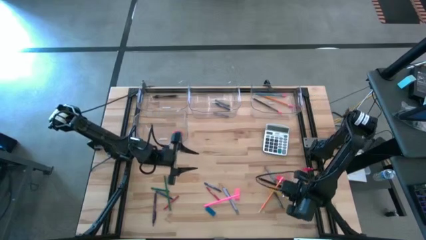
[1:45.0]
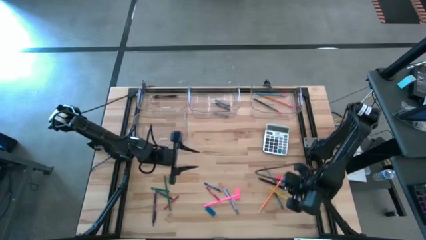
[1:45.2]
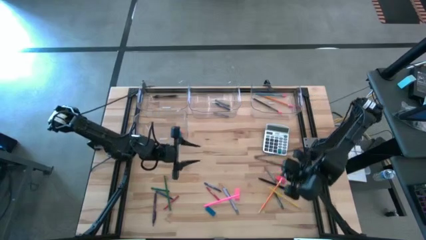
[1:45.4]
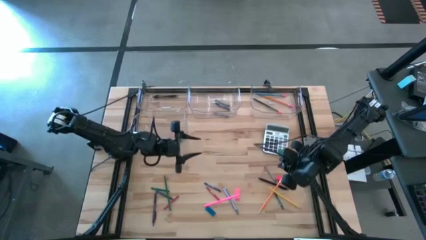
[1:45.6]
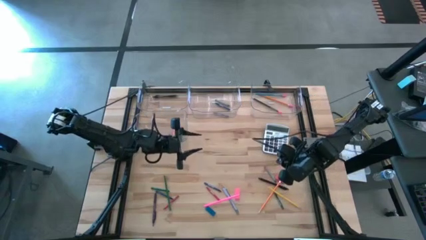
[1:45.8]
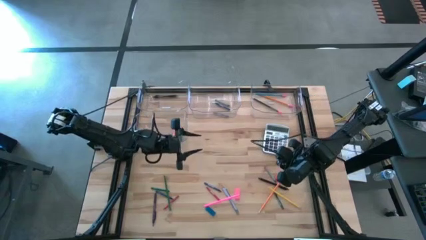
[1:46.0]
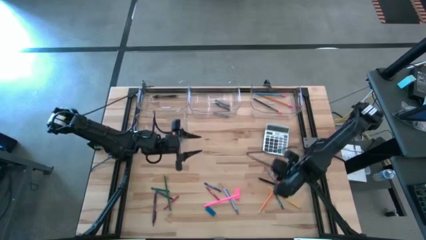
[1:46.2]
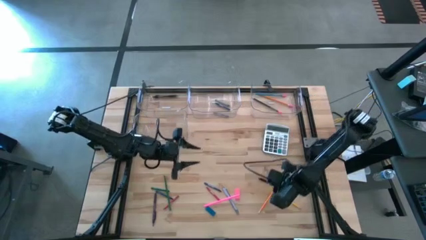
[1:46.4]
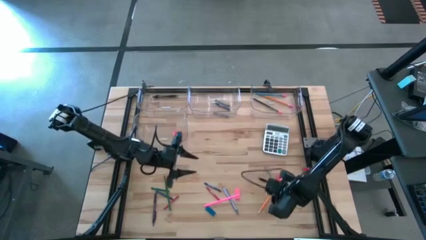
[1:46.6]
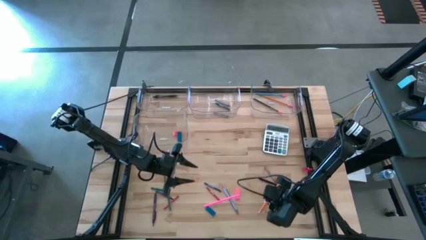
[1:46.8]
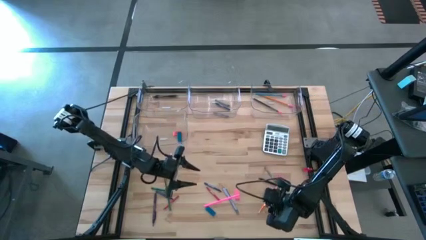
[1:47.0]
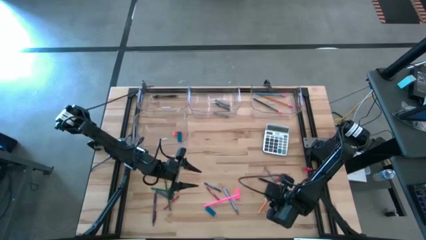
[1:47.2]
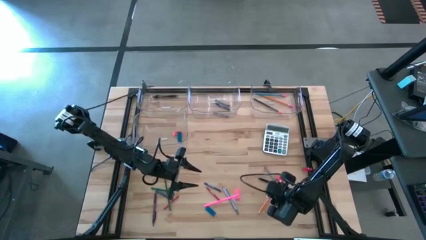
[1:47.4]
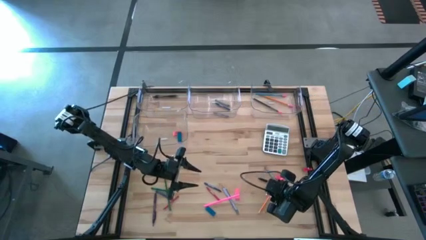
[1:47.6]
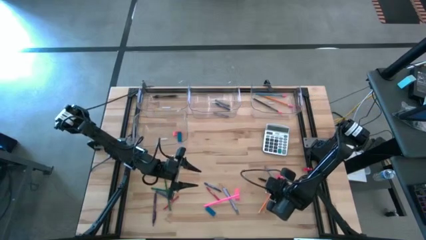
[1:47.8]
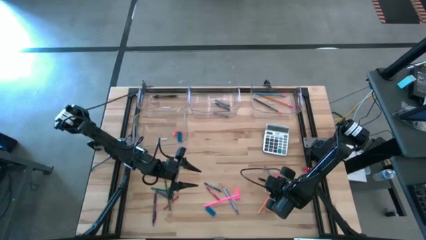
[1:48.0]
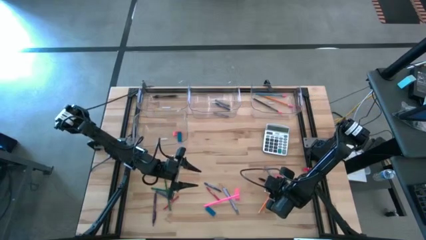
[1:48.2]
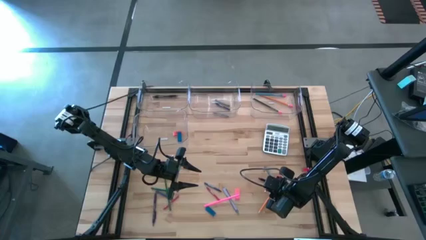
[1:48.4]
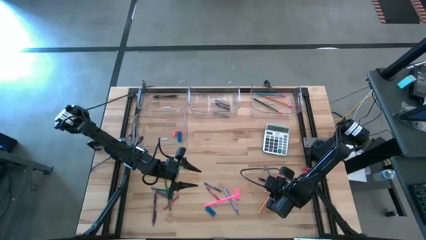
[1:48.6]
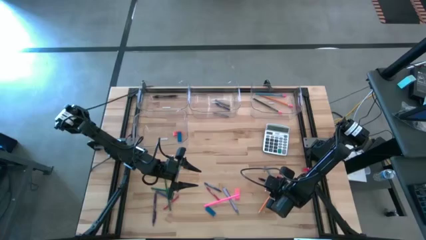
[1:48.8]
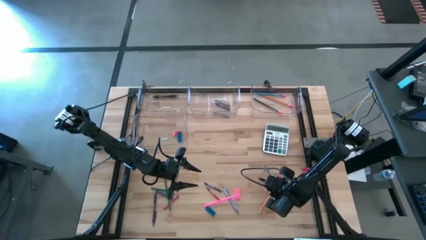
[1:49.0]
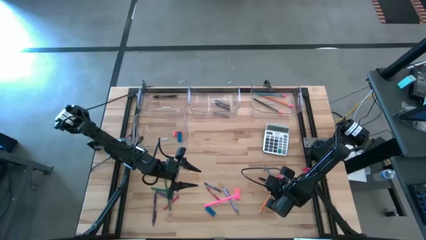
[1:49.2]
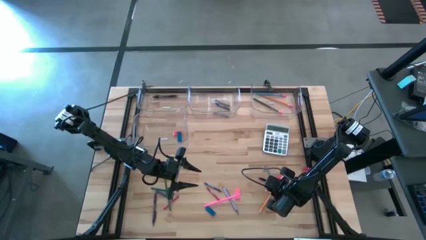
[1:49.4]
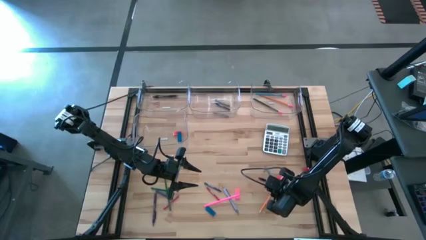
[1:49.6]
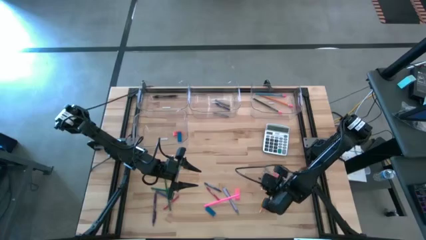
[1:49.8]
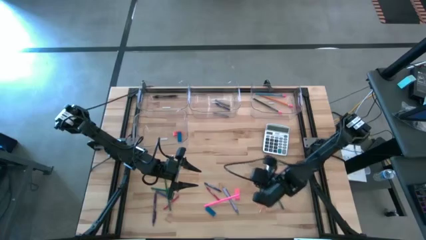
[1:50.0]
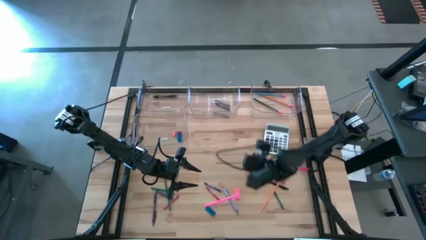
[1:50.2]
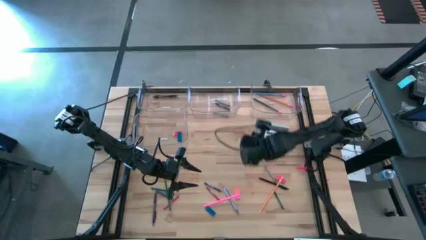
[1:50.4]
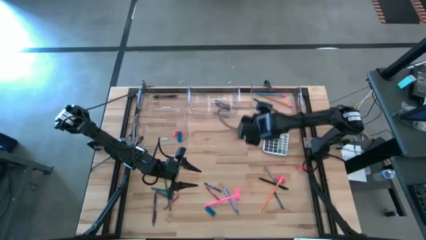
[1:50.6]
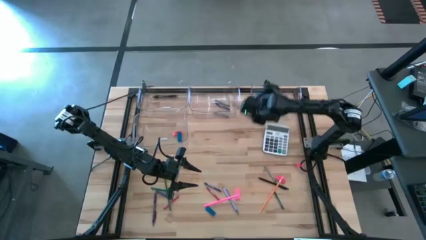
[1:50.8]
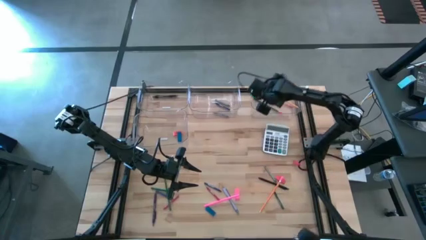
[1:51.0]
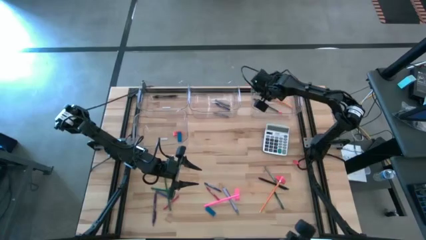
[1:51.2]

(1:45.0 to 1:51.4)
Task: Sort crayons/erasers/pens/pencils in bins
Put the yellow pencil into the top right transparent bin

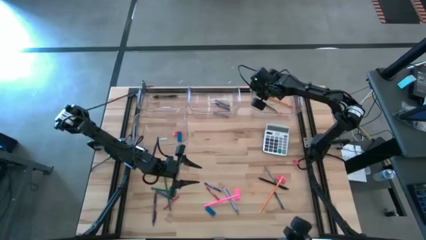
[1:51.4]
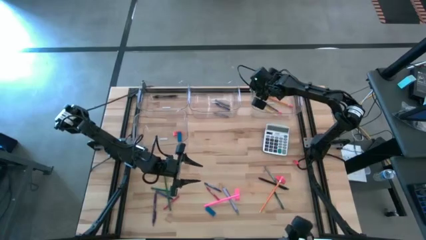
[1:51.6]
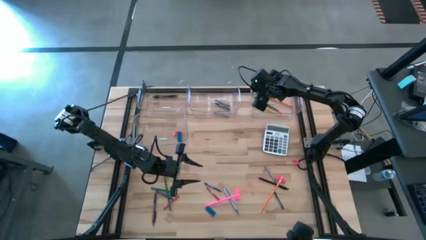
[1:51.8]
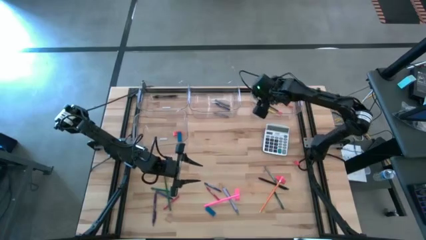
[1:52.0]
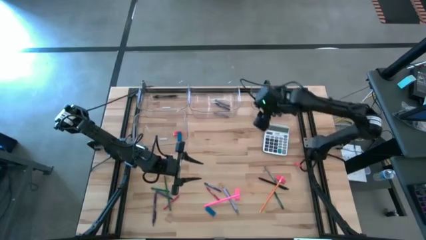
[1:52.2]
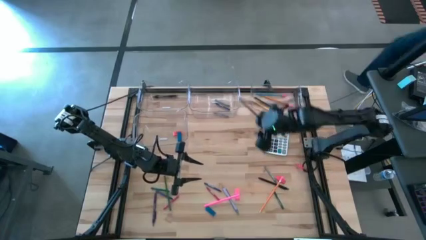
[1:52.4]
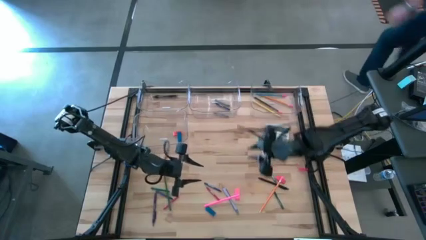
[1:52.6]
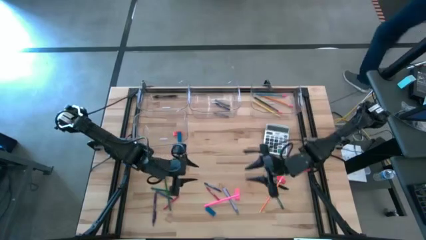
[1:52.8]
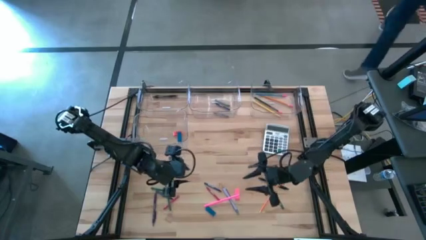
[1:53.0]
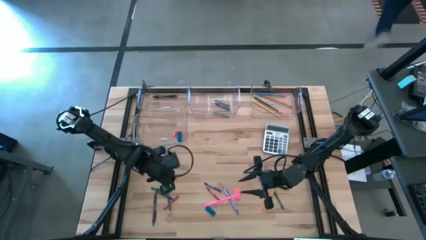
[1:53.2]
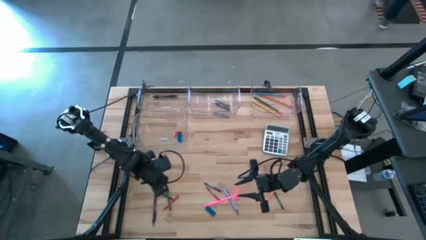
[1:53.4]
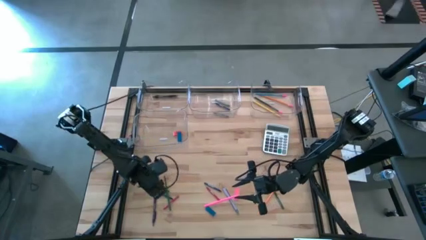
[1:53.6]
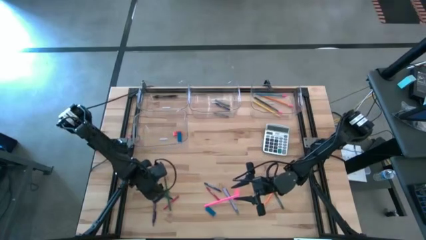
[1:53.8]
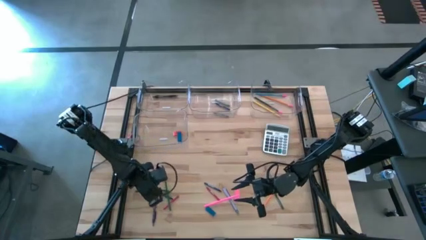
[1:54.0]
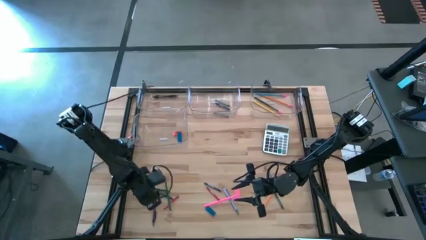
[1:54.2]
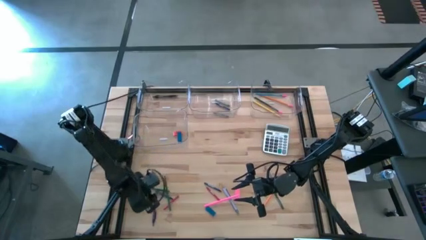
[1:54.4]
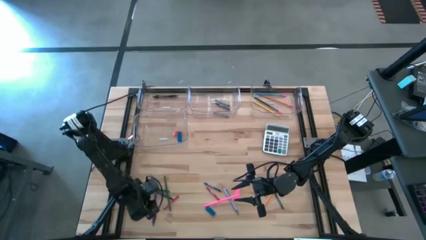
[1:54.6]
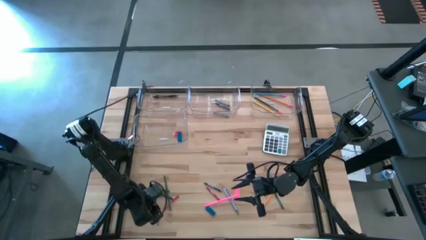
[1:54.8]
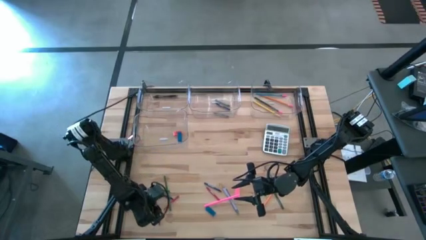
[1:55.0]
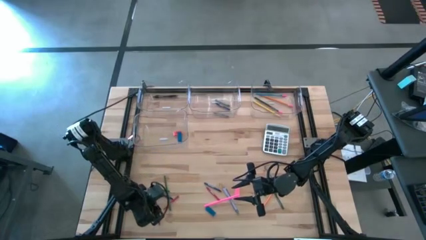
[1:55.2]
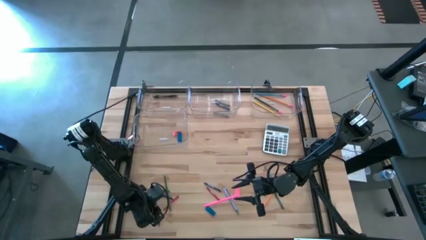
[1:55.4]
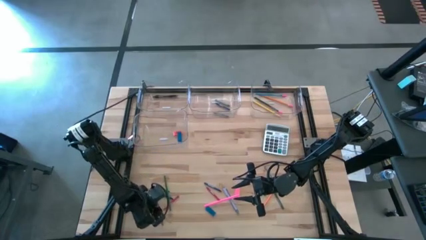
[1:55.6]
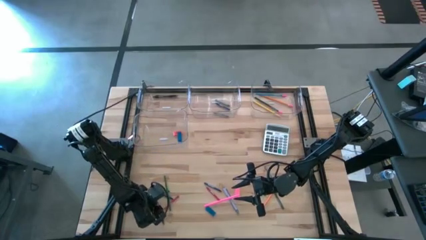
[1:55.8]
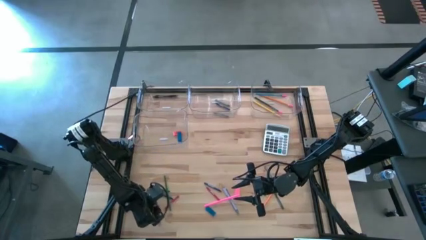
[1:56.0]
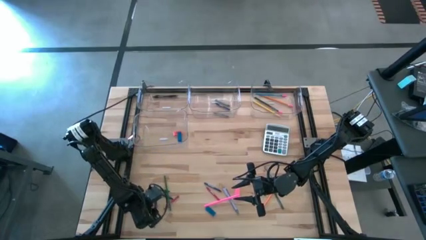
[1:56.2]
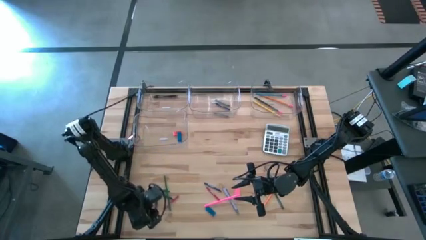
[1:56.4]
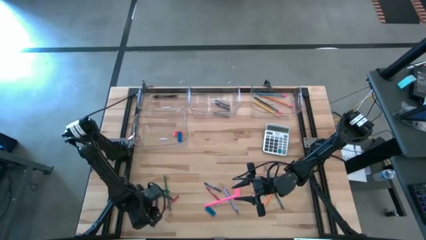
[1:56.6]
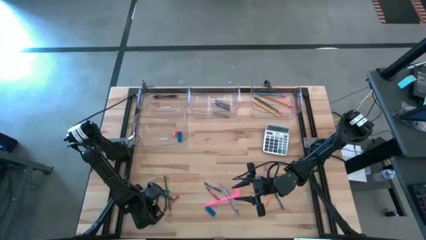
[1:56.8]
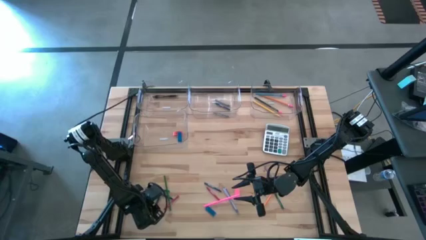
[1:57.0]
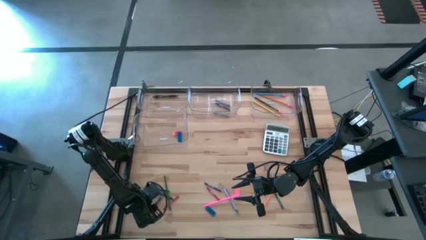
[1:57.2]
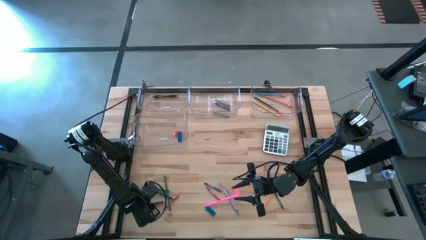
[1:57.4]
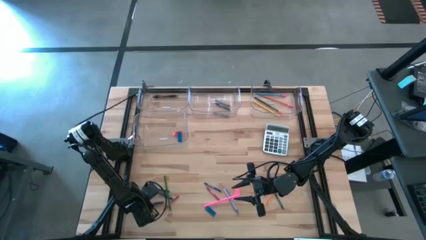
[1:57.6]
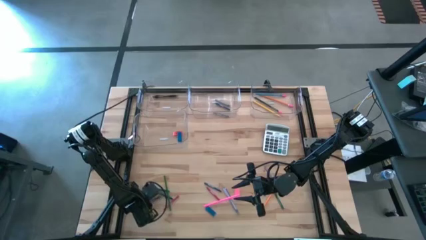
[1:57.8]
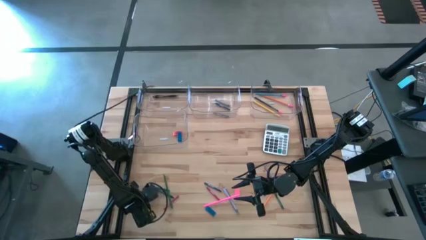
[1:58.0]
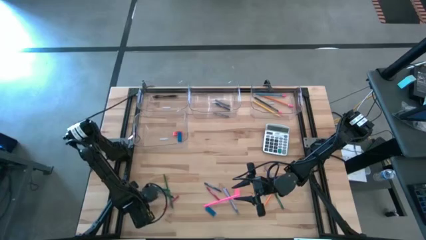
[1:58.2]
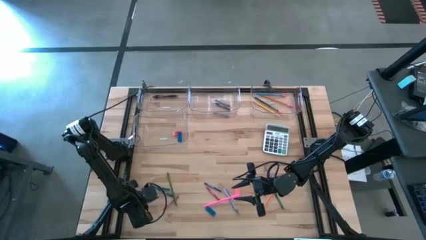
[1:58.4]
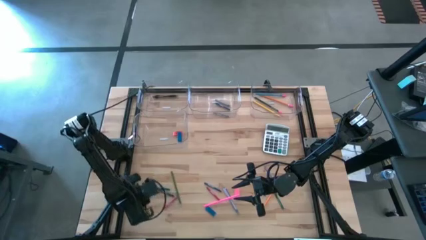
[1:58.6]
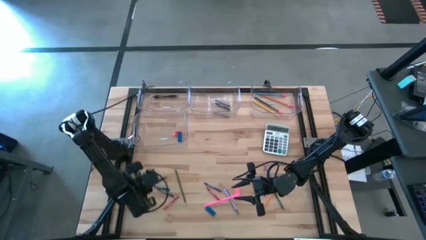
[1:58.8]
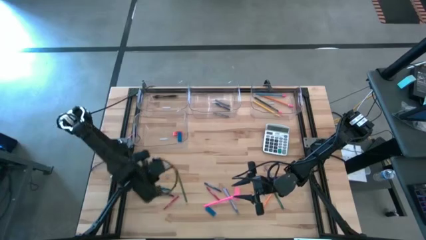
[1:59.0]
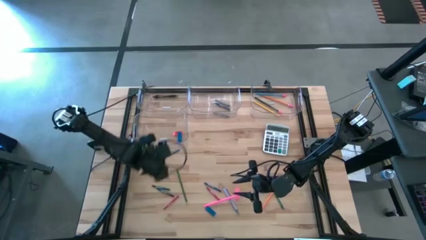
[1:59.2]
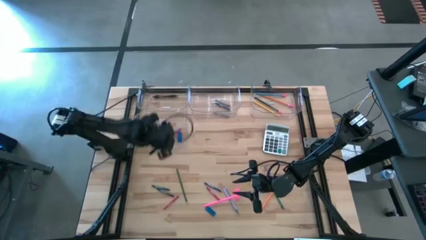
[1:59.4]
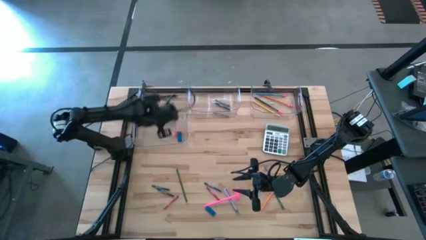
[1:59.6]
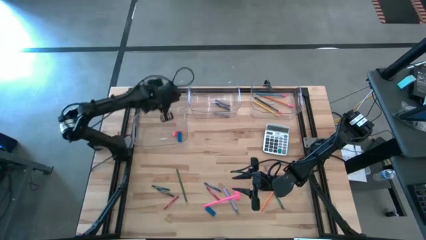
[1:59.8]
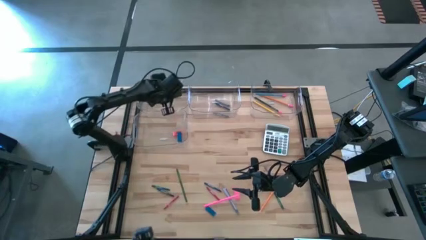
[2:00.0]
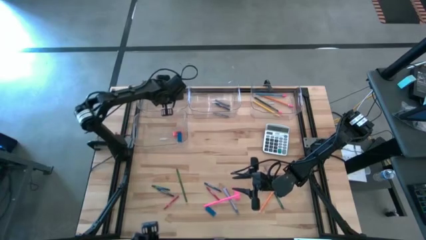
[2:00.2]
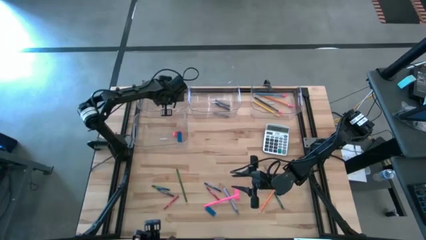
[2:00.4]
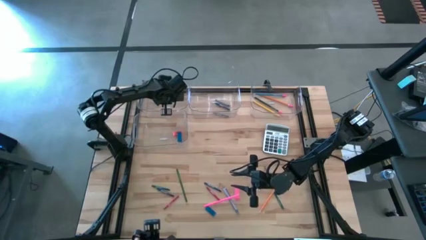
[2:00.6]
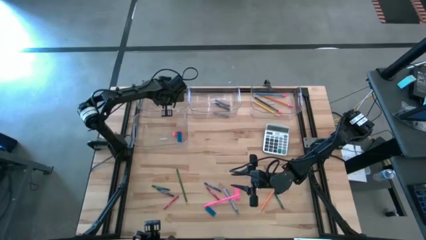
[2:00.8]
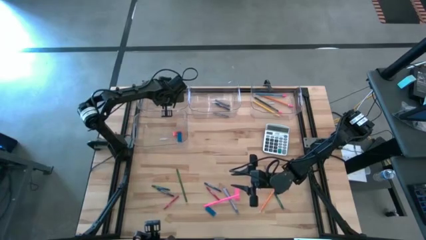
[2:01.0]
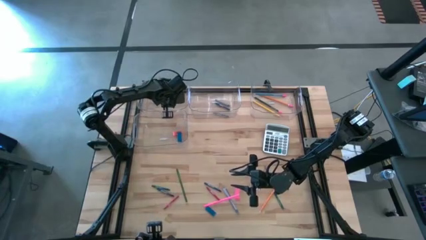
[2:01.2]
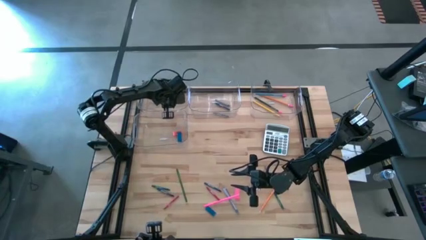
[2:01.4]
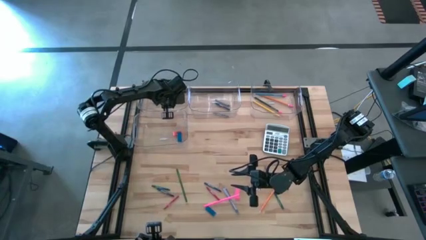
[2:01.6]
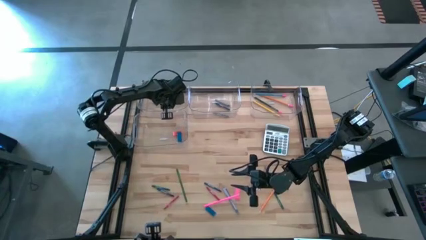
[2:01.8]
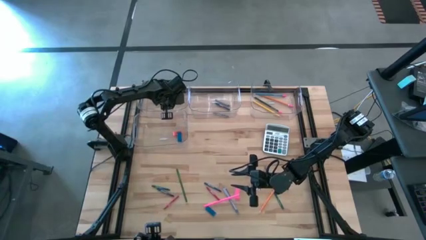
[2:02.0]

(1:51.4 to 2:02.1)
Put the blue pen into the top left transparent bin
